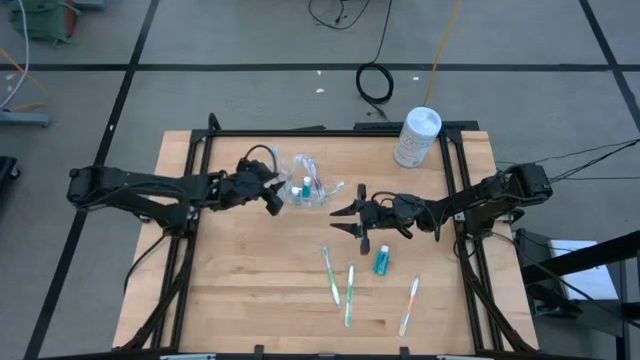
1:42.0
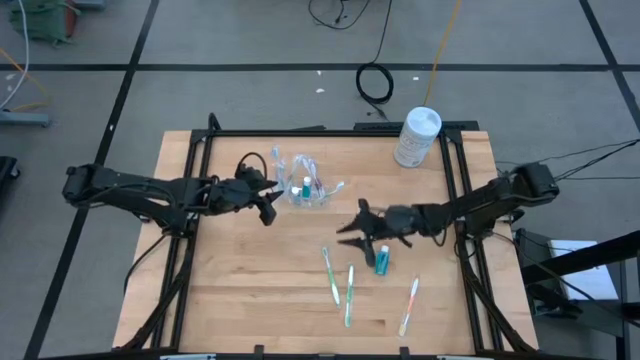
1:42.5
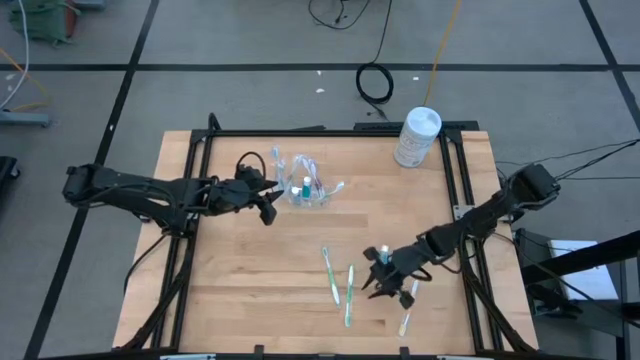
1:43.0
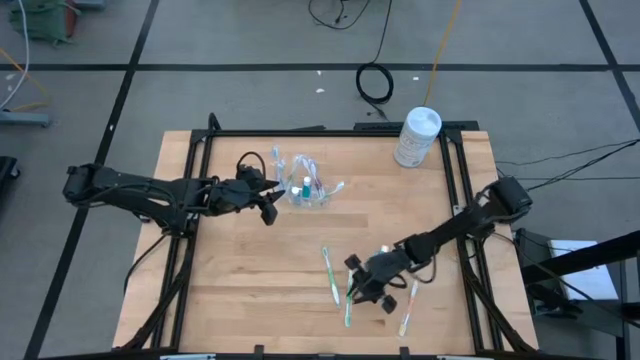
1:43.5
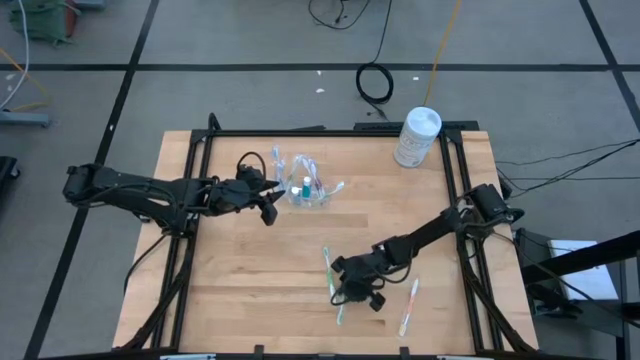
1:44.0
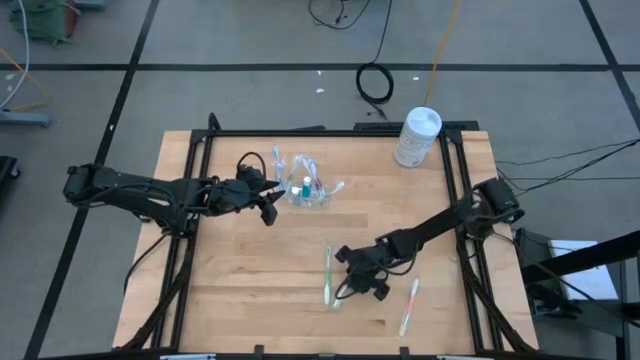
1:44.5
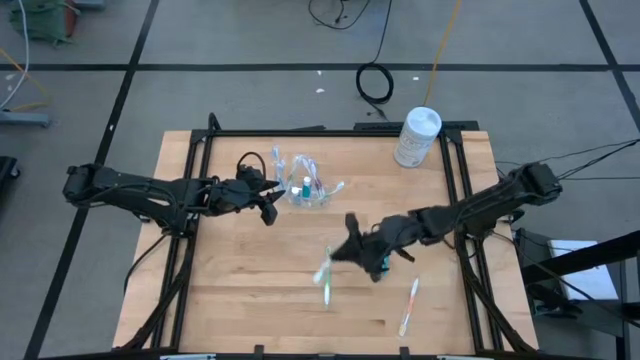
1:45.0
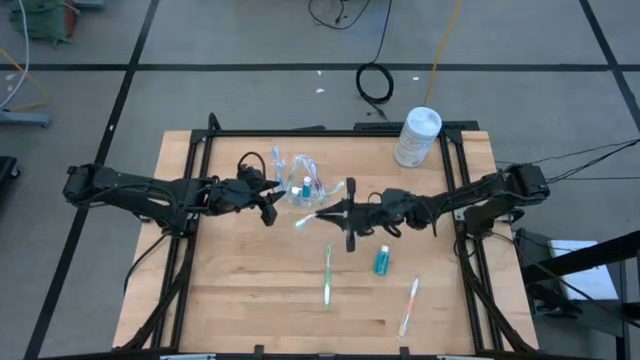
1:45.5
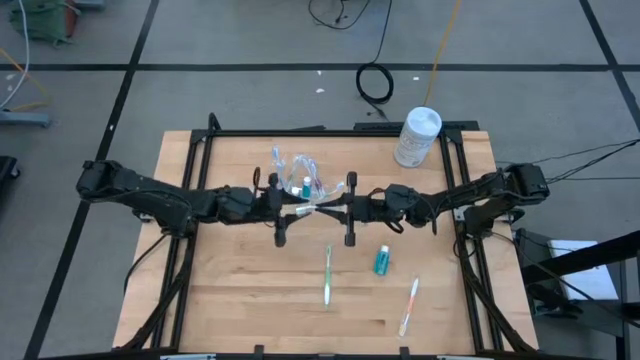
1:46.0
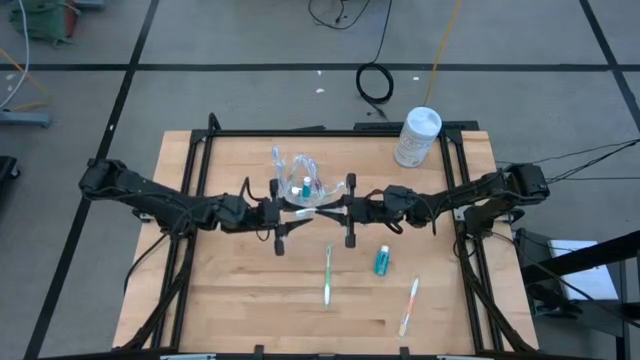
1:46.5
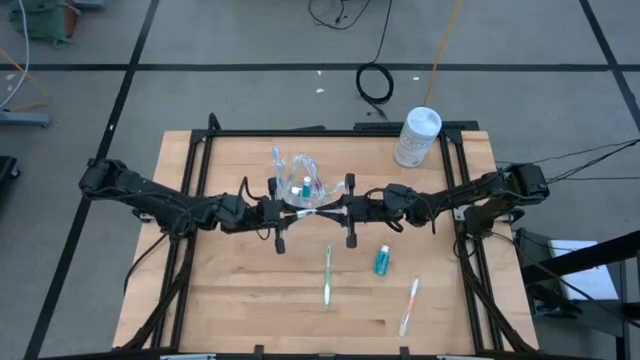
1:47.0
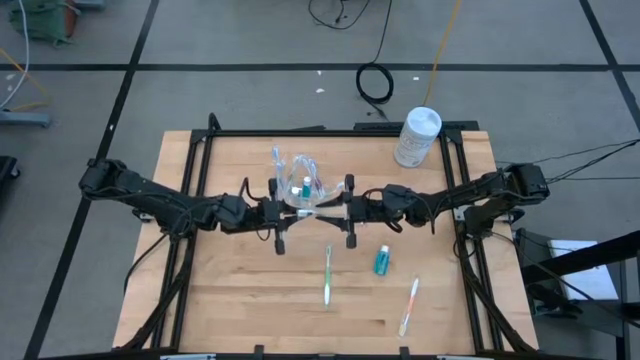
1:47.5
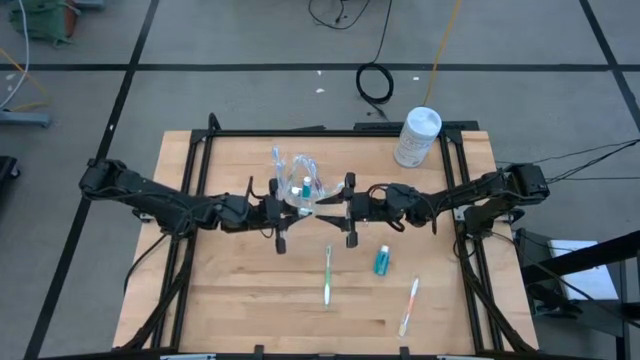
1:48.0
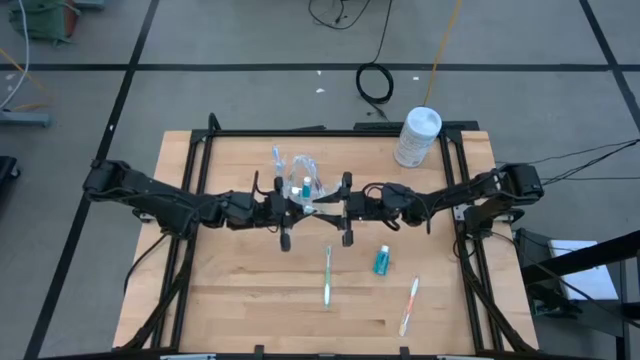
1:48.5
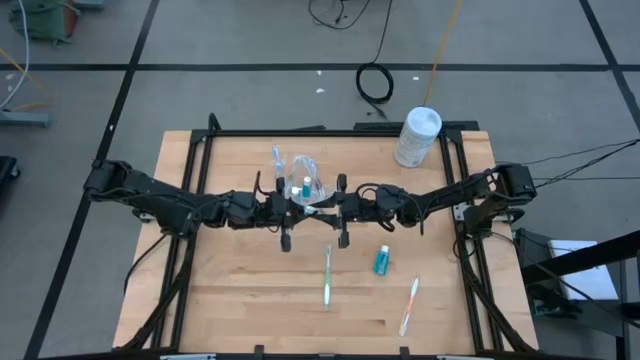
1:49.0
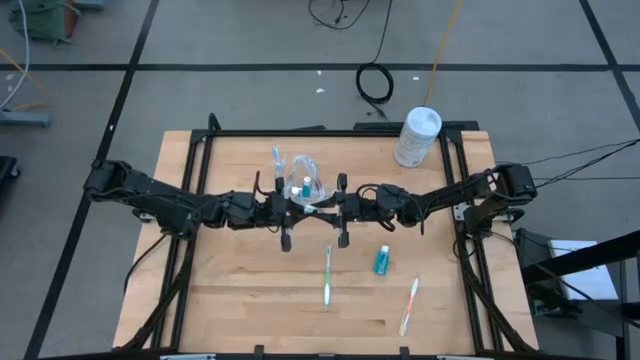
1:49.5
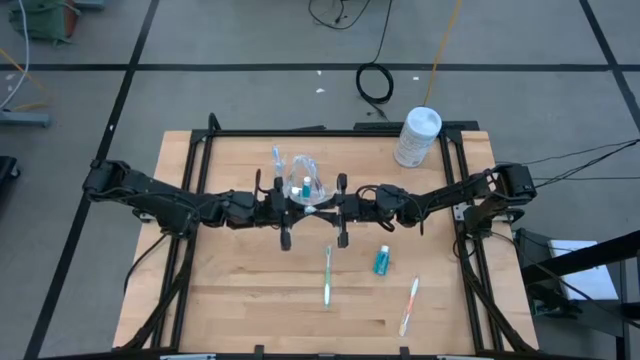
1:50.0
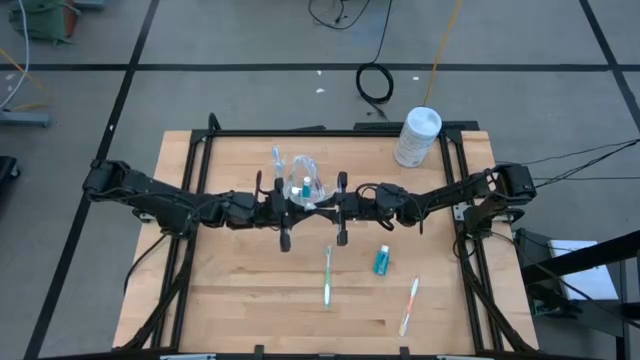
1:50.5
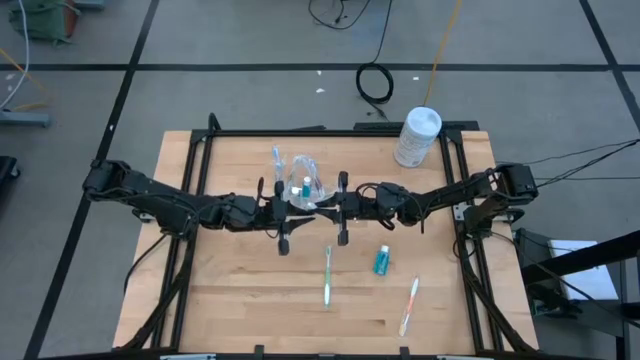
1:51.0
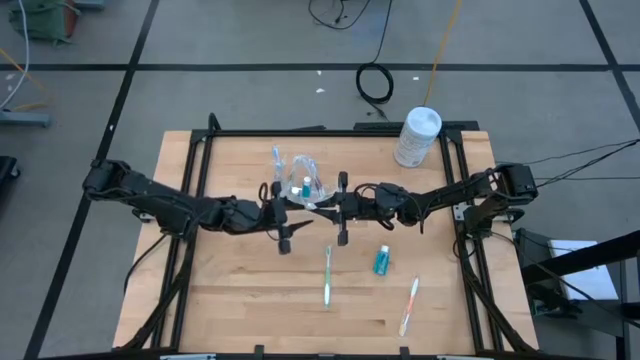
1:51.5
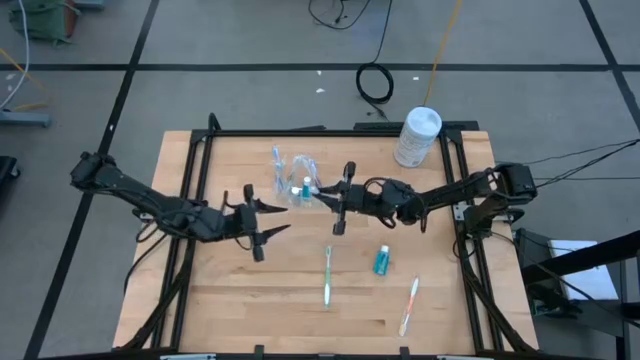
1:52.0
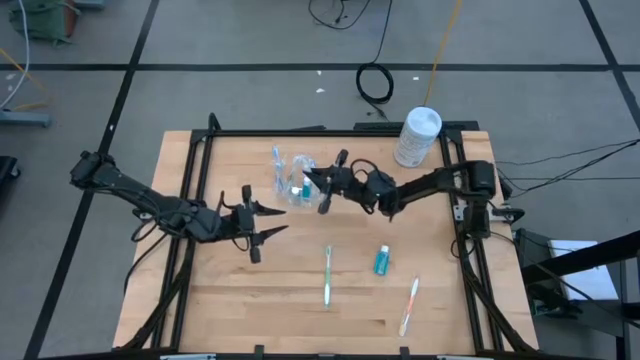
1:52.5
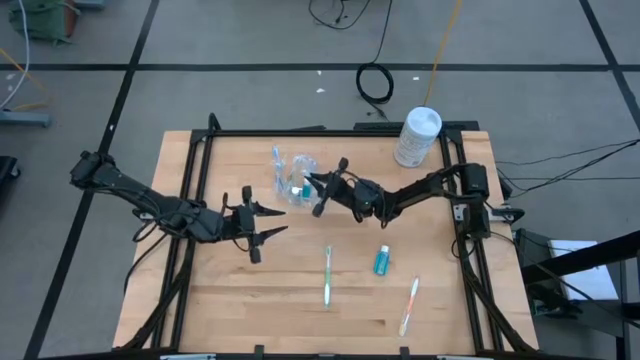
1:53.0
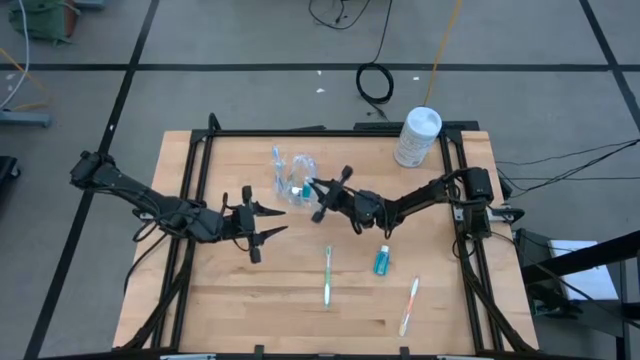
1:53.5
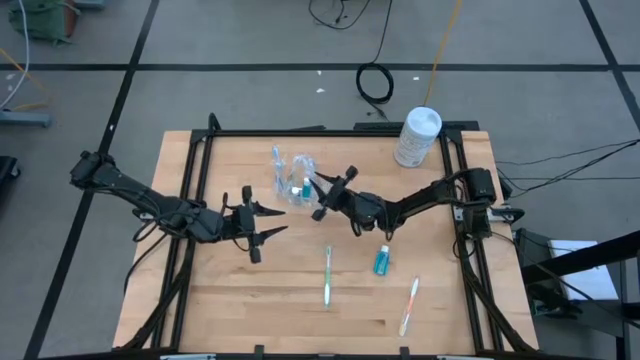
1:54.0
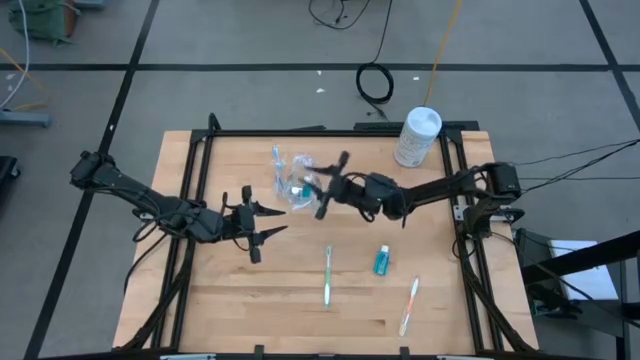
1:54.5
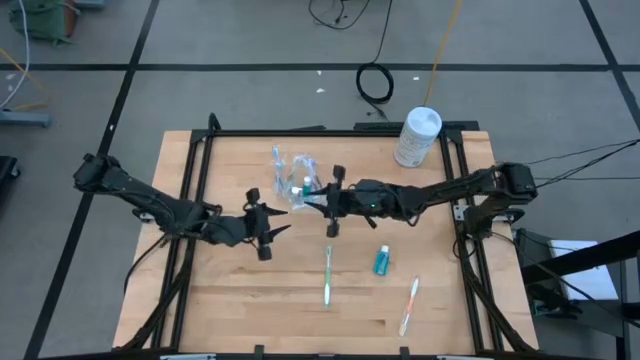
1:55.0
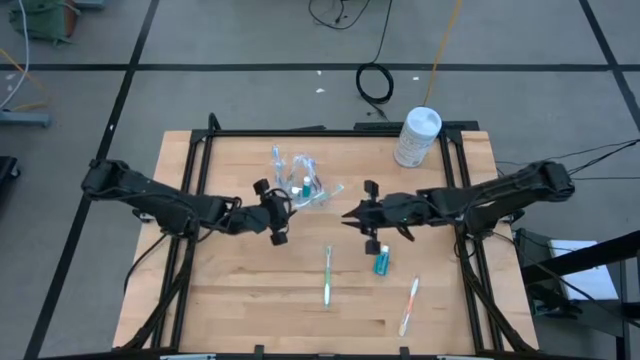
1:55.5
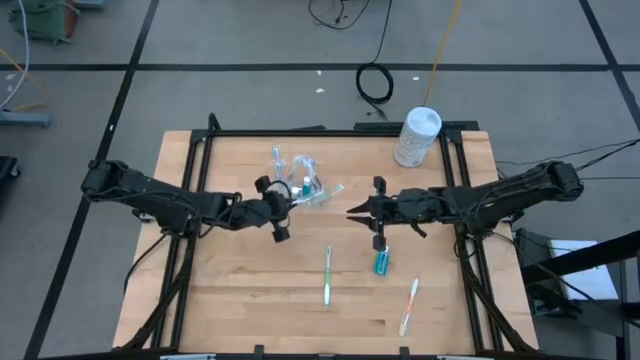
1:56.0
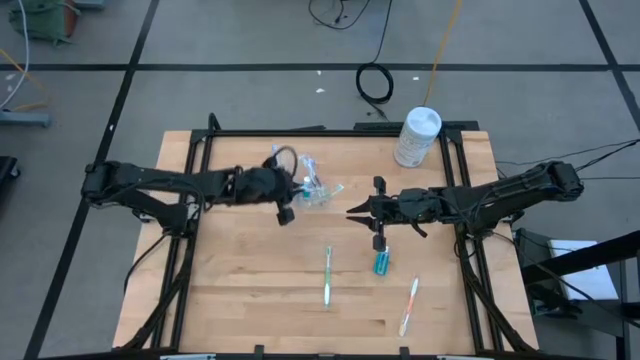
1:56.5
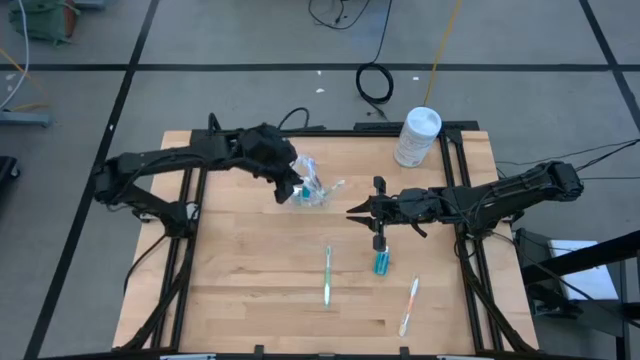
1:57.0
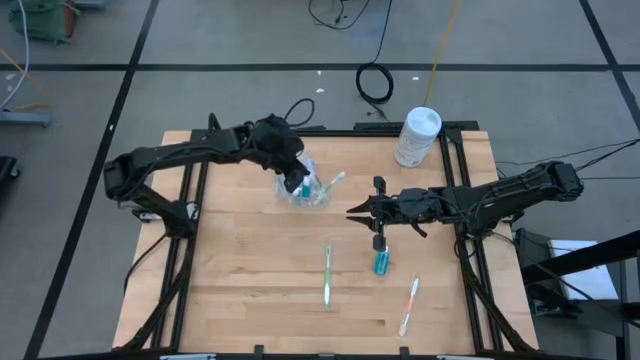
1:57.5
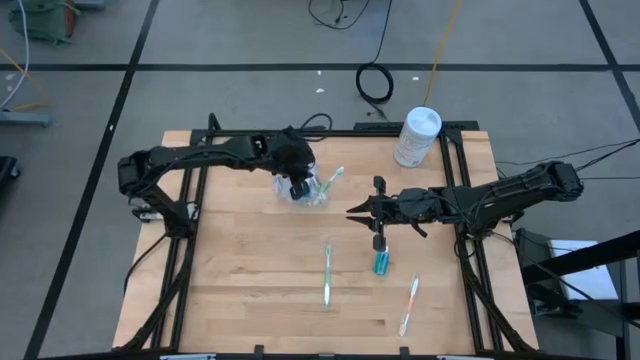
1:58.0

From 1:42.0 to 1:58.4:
Task: Pick & Place toothbrushing station
Put the green toothbrush into the transparent organizer

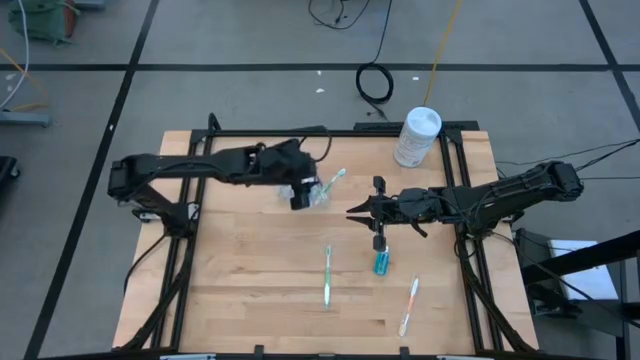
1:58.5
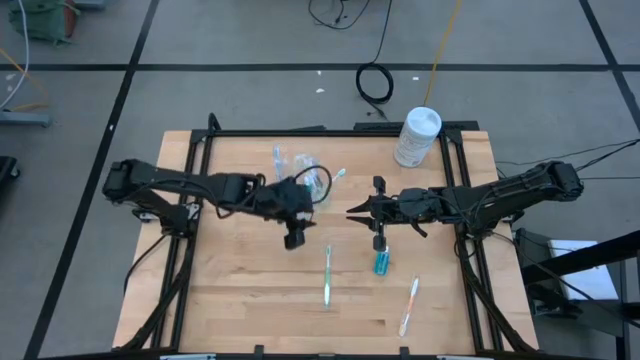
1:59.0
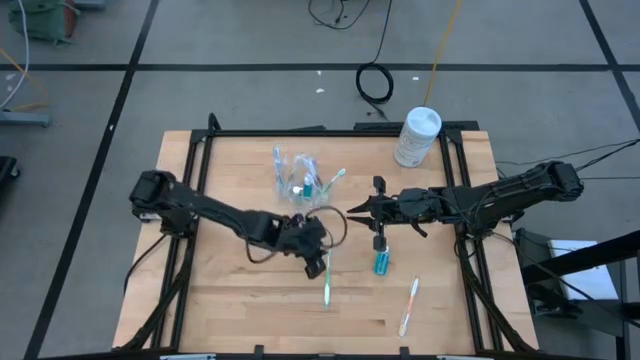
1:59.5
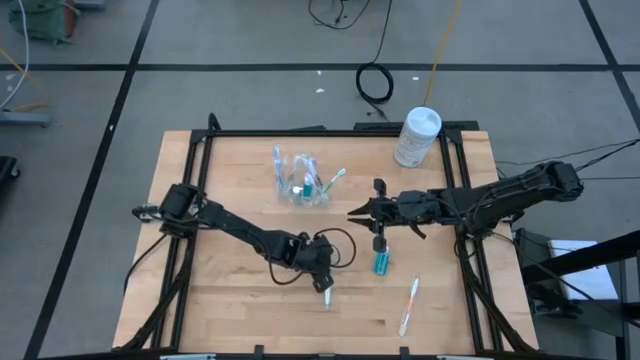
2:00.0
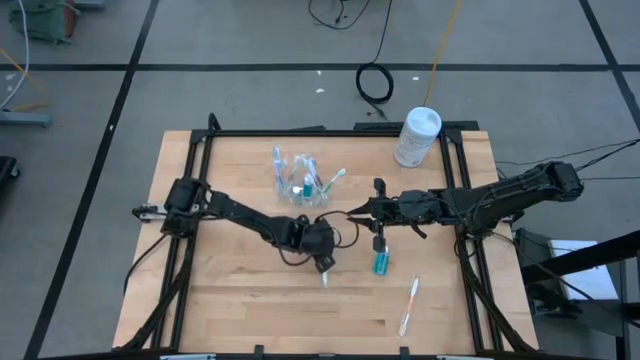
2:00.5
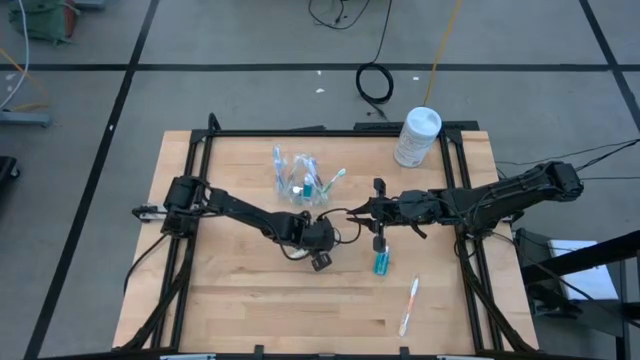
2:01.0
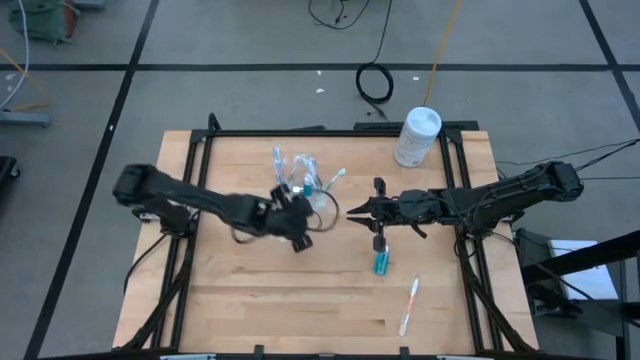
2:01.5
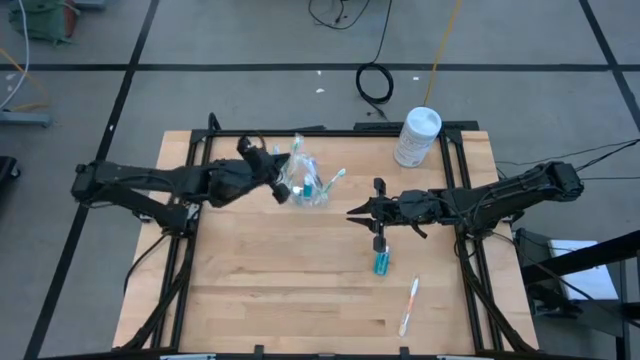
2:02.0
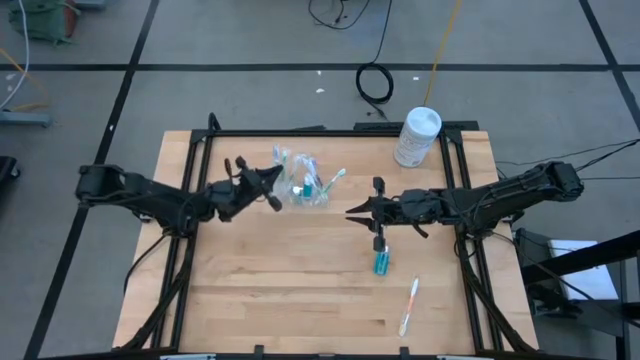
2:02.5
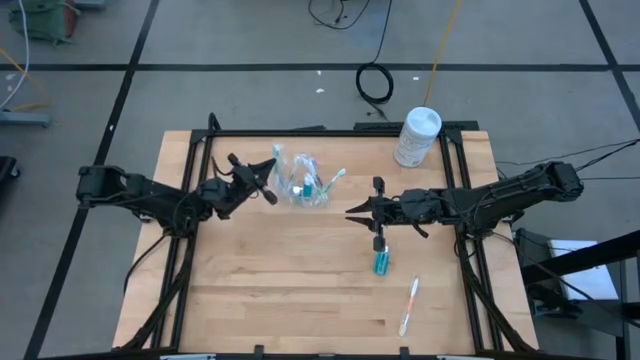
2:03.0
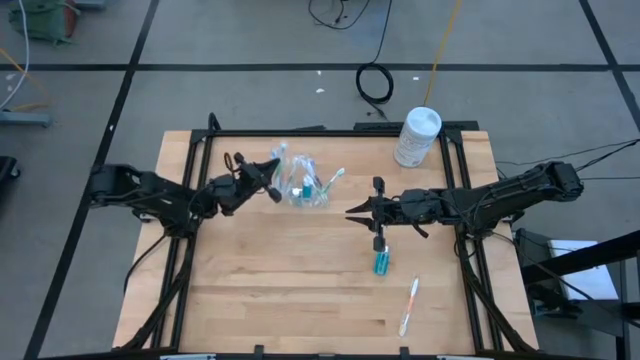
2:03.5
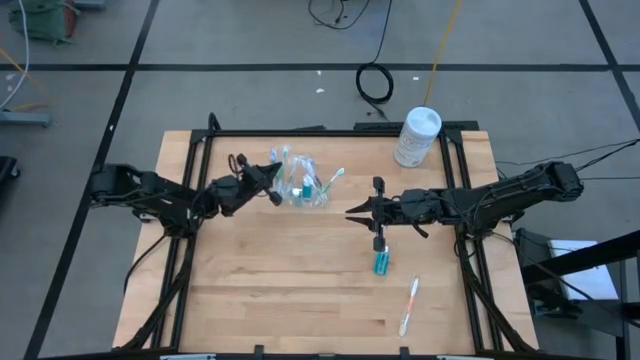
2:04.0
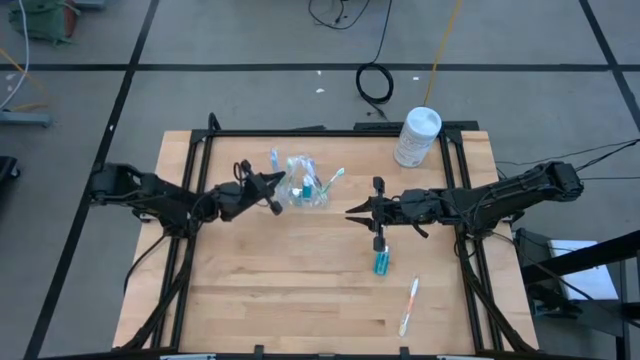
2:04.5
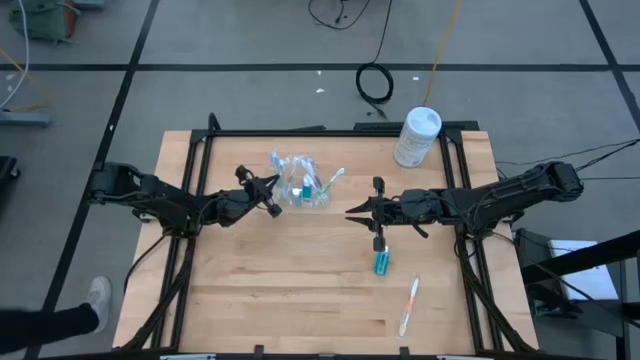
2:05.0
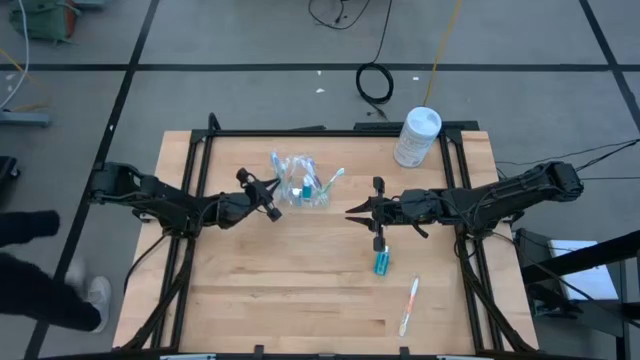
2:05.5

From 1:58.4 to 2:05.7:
Put the green toothbrush into the transparent organizer
